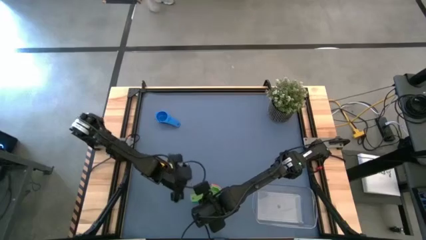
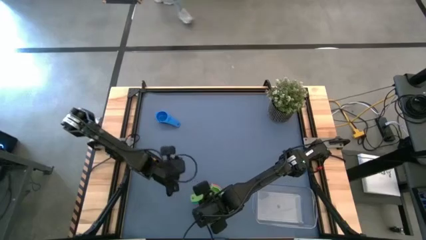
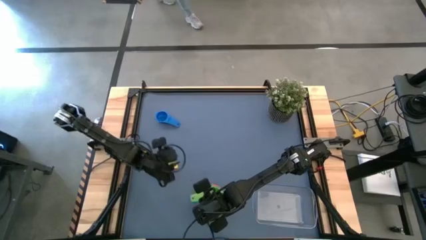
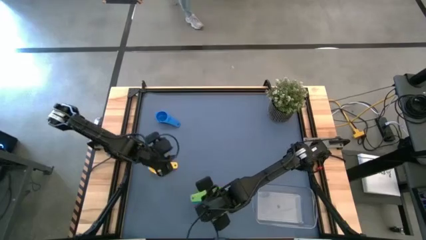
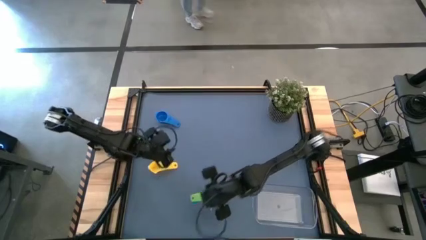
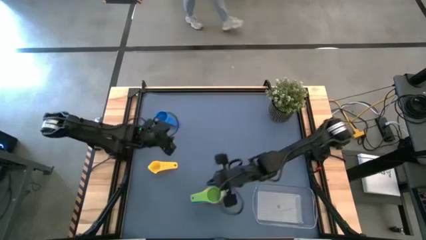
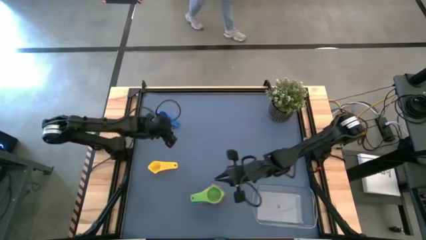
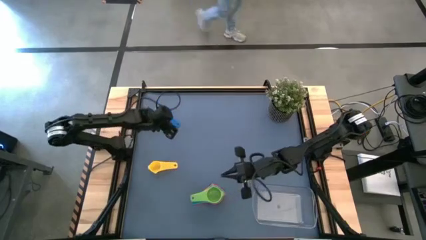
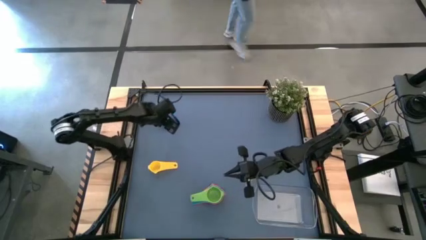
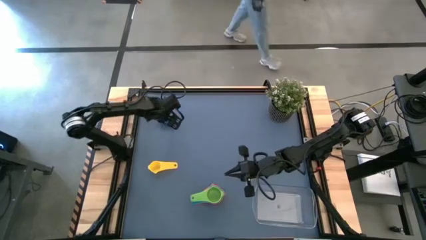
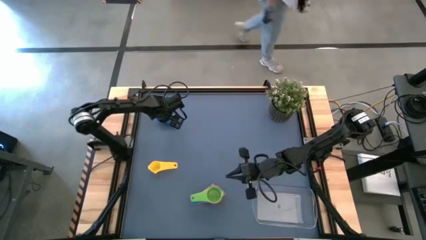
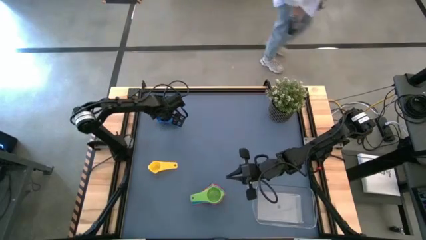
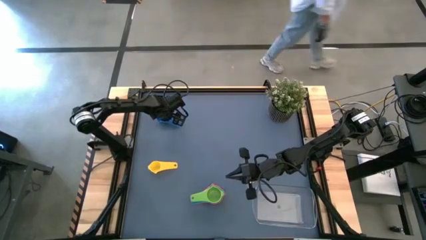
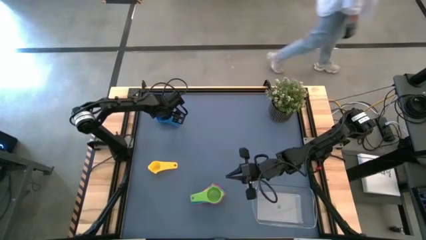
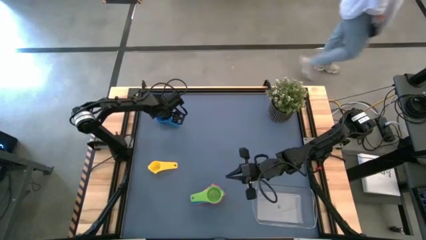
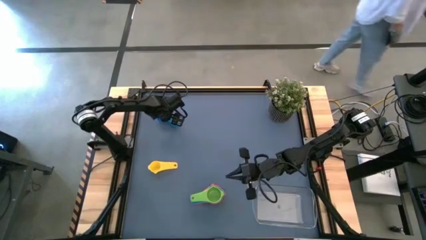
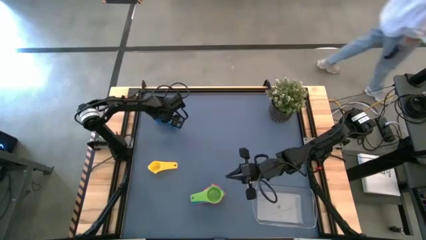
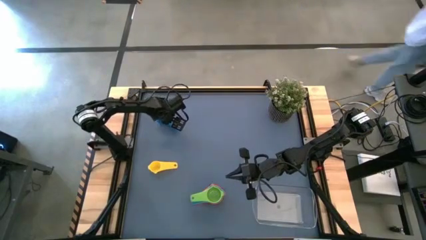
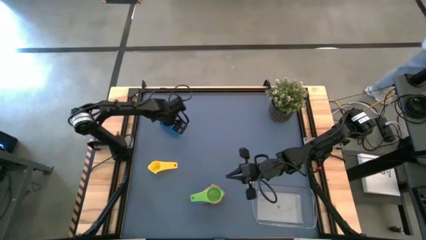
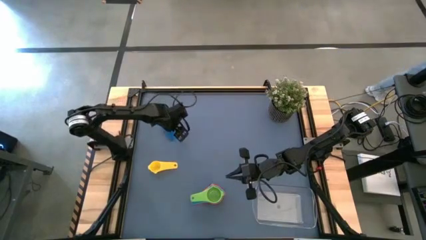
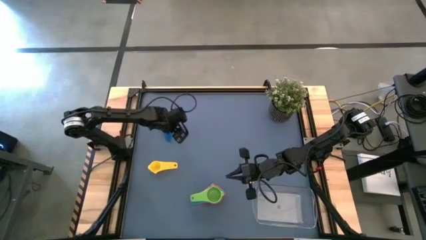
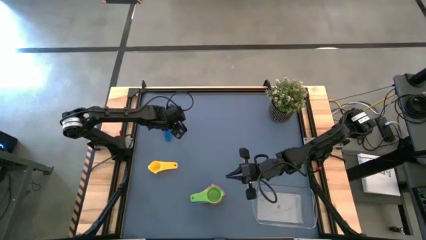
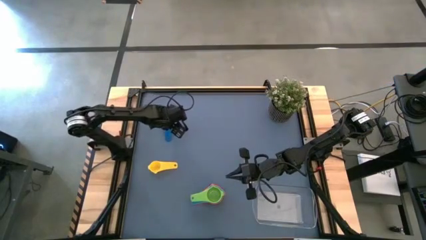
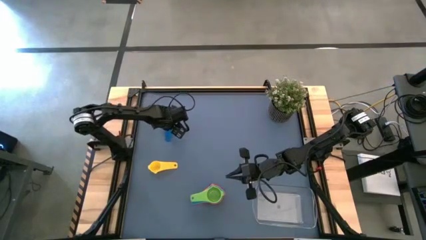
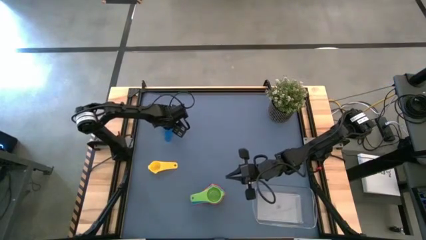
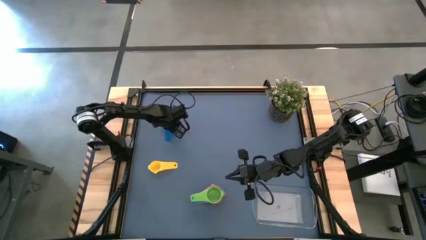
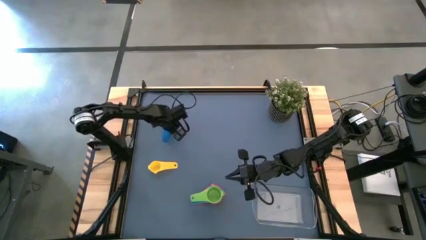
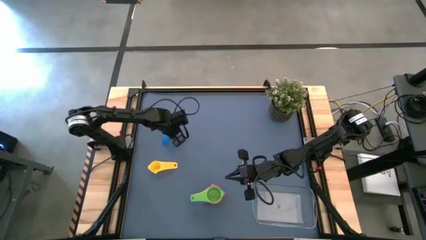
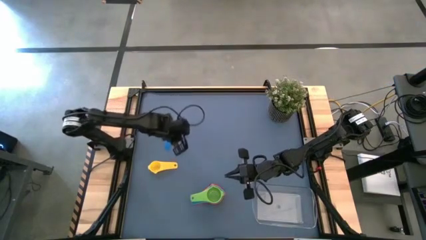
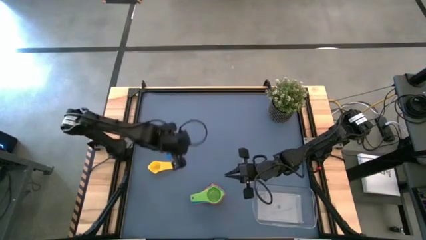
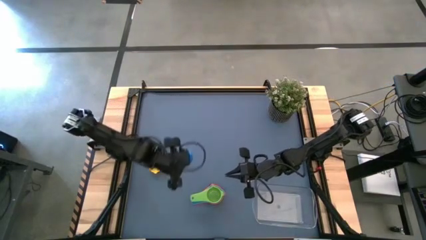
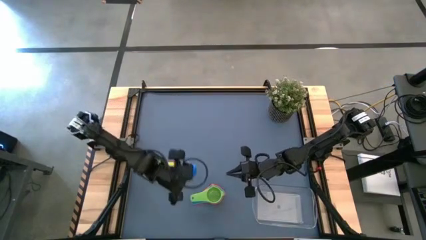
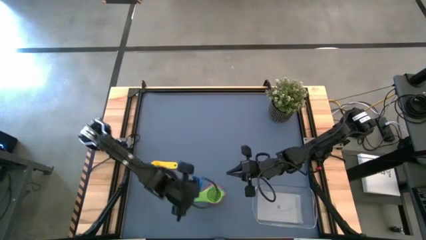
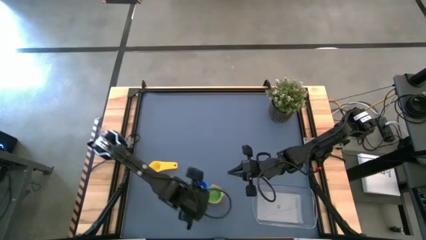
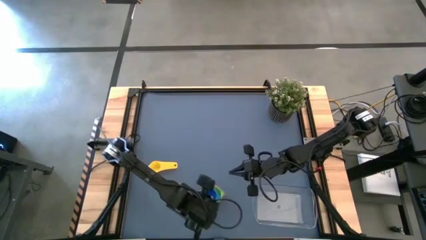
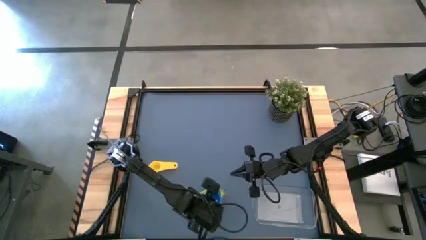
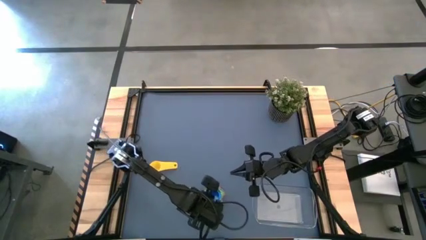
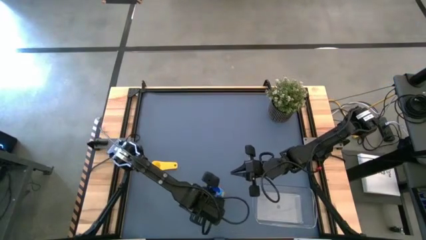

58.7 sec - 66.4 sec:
Task: Nest measuring cups in basket
Stack the blue measuring cup on top of the light green measuring cup

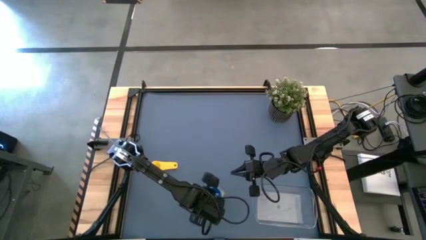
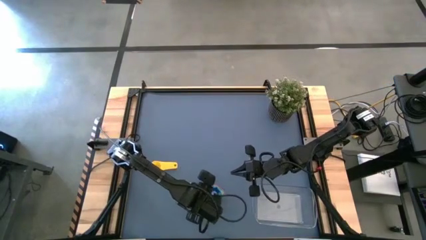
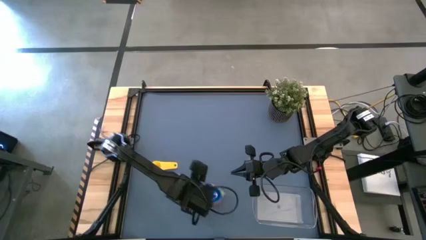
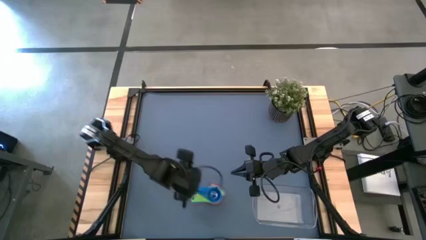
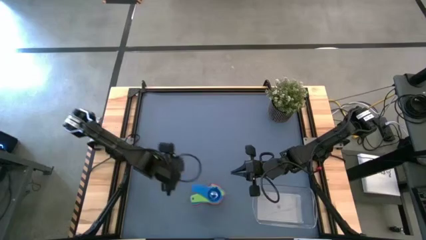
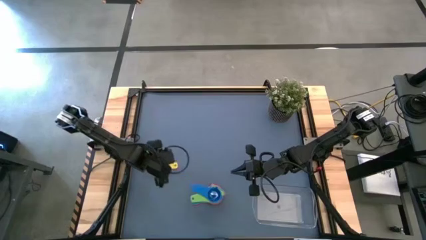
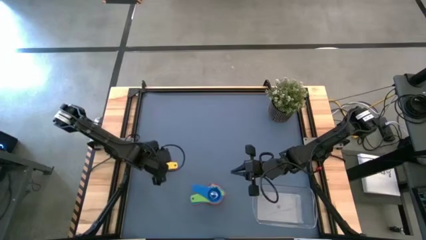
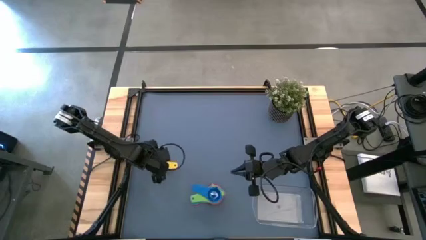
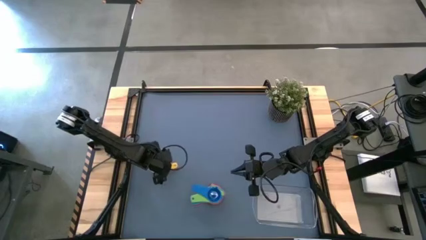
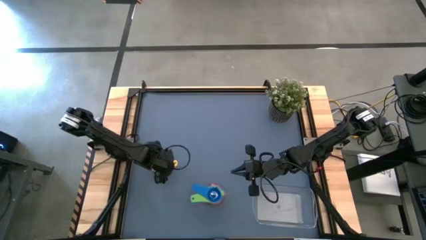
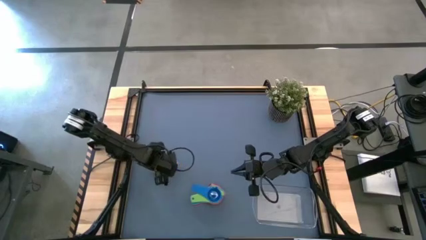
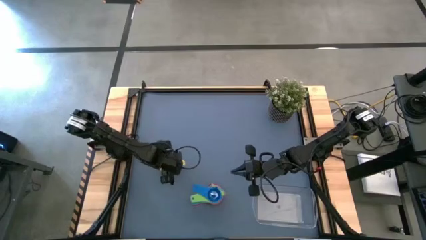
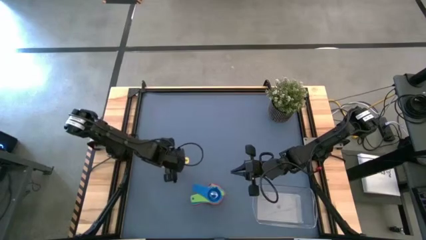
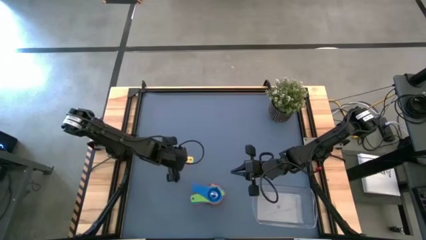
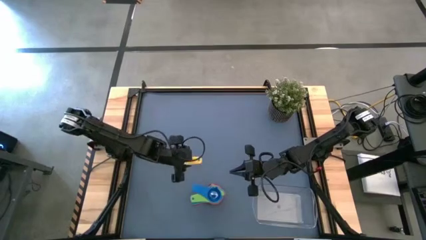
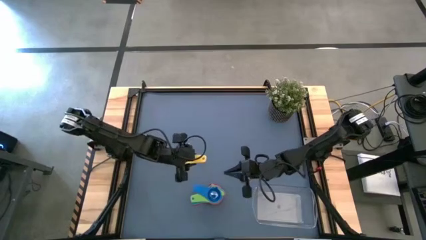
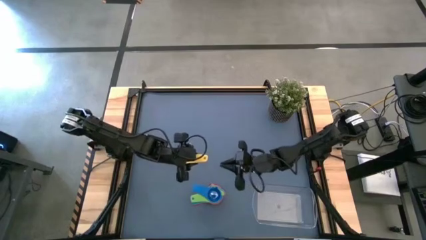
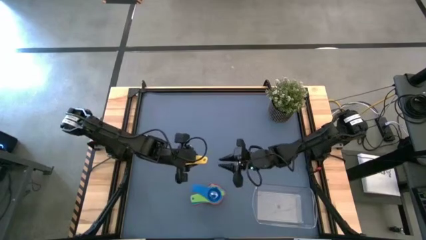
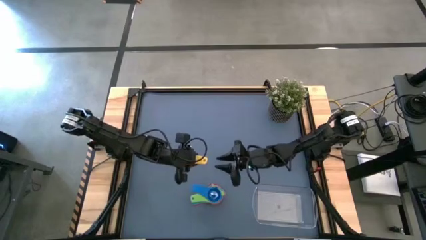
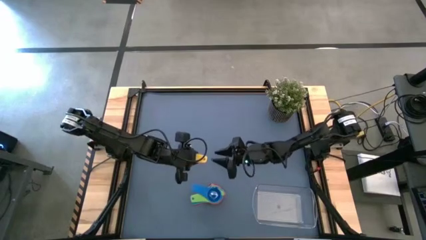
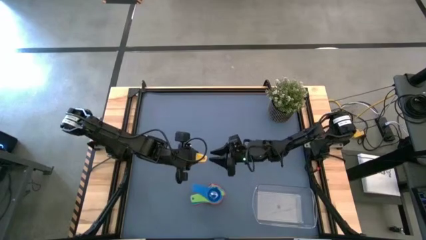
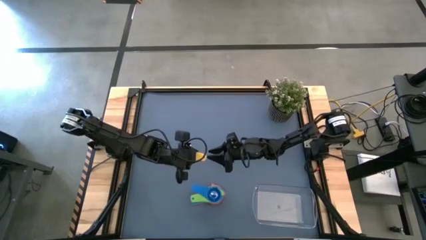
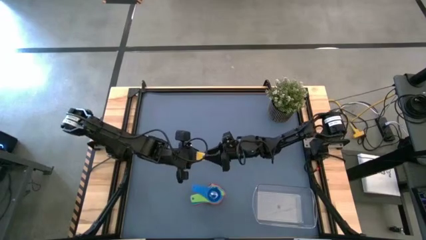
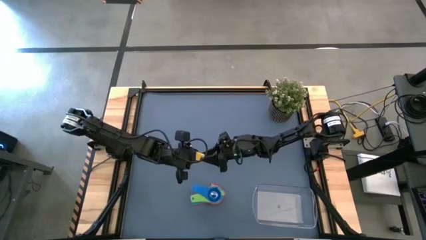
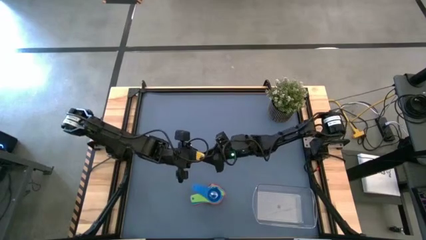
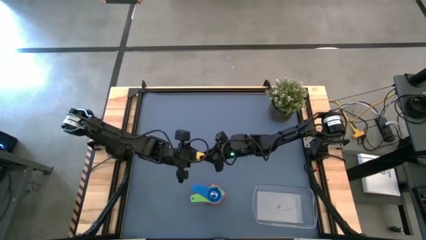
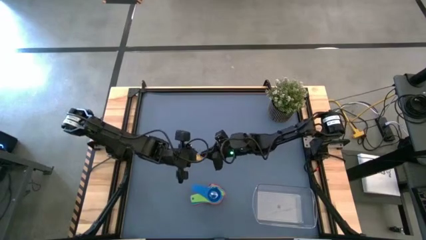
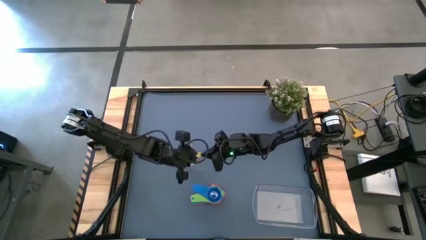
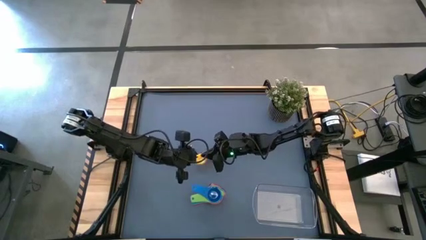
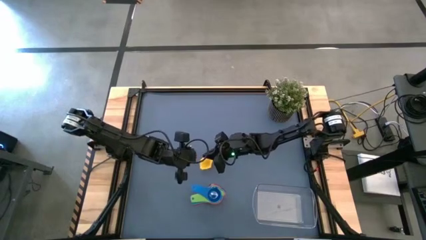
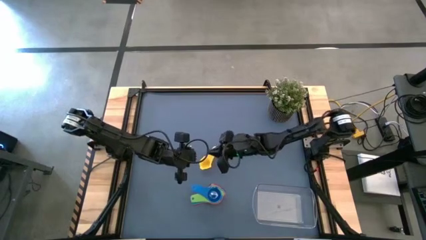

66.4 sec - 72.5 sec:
Stack the yellow measuring cup on top of the blue measuring cup
